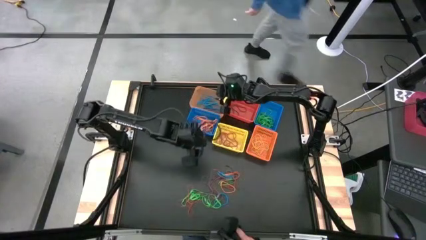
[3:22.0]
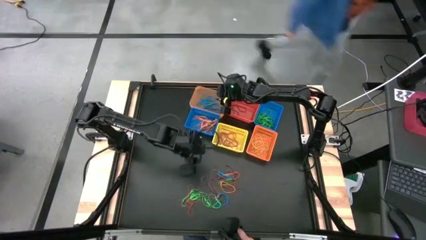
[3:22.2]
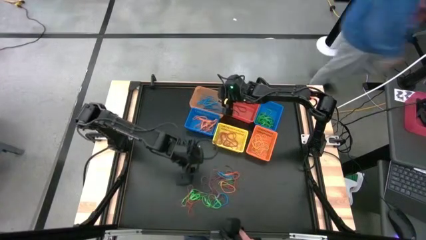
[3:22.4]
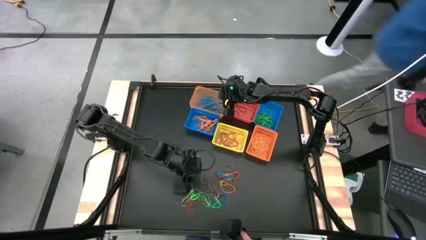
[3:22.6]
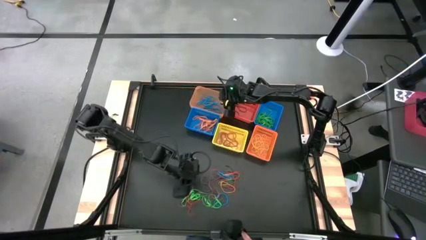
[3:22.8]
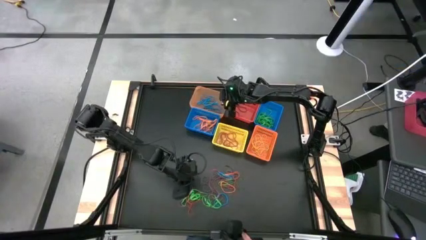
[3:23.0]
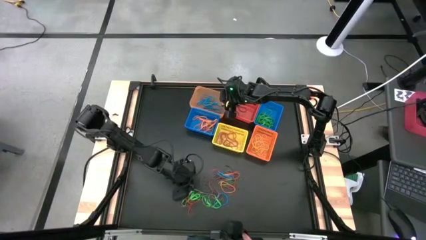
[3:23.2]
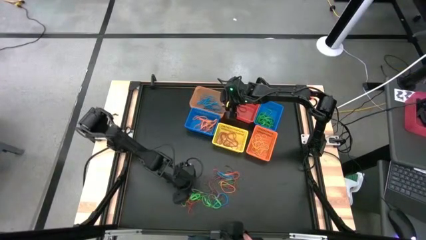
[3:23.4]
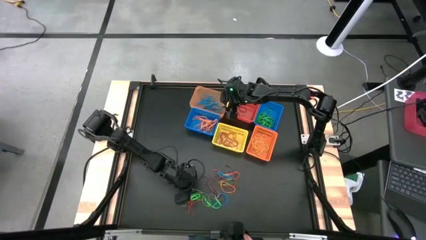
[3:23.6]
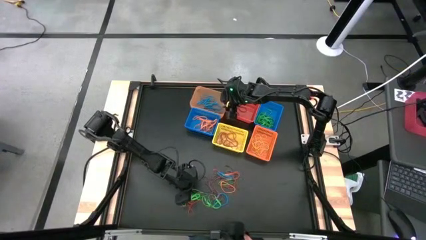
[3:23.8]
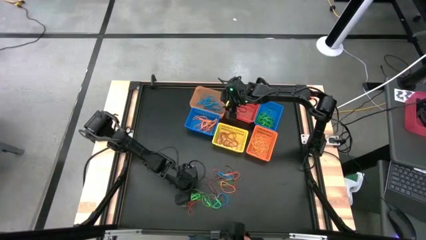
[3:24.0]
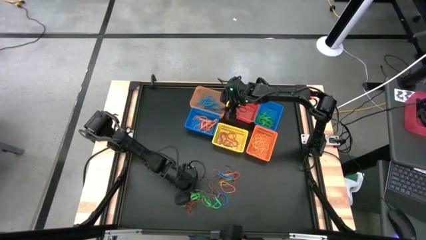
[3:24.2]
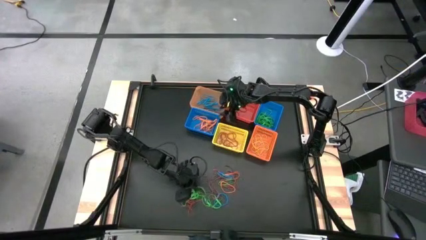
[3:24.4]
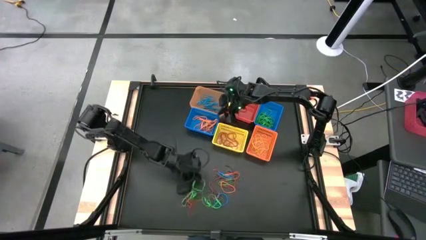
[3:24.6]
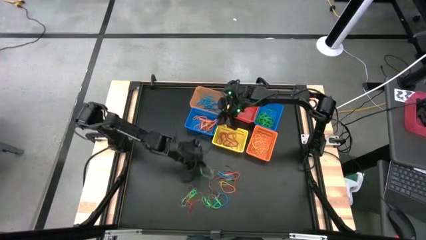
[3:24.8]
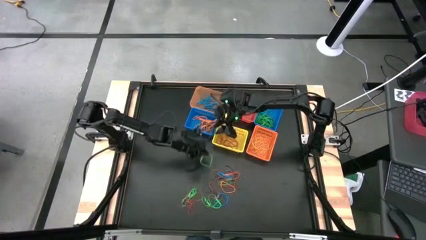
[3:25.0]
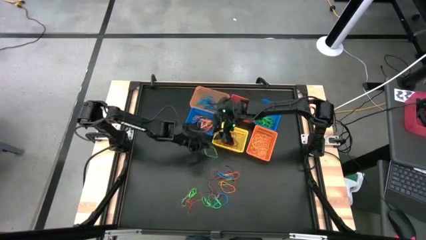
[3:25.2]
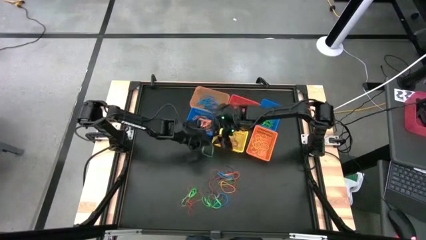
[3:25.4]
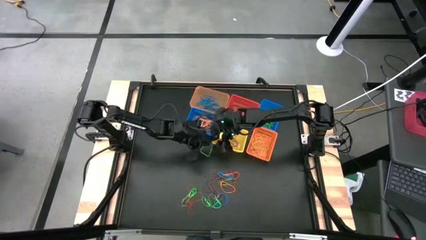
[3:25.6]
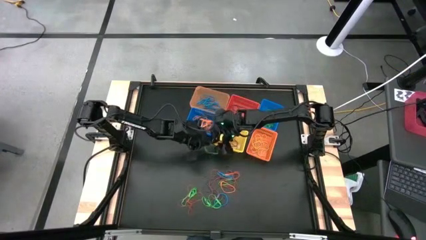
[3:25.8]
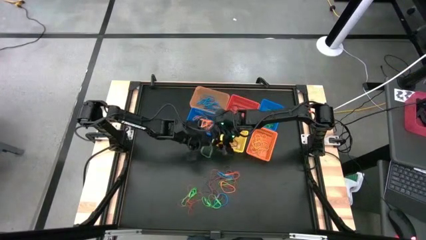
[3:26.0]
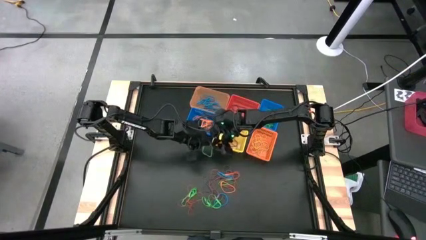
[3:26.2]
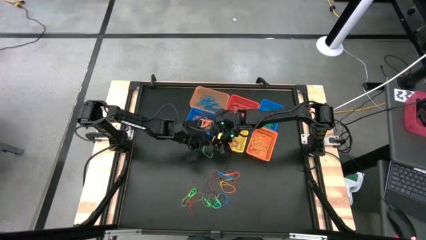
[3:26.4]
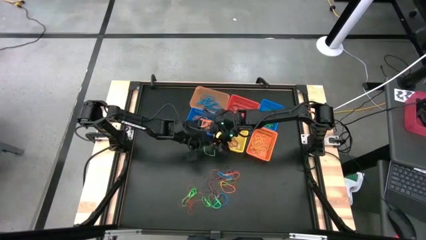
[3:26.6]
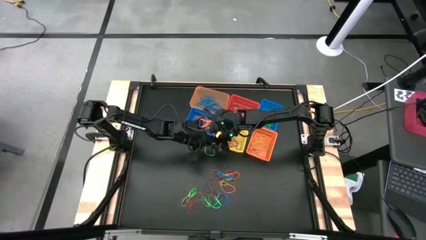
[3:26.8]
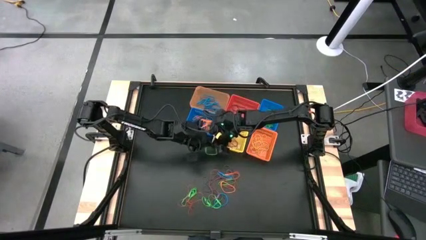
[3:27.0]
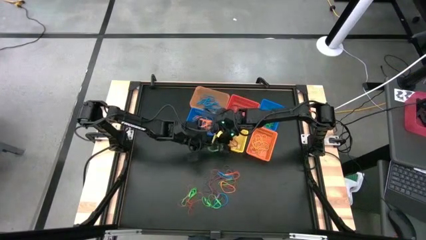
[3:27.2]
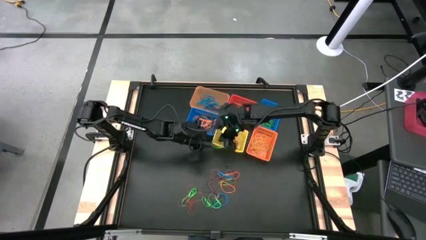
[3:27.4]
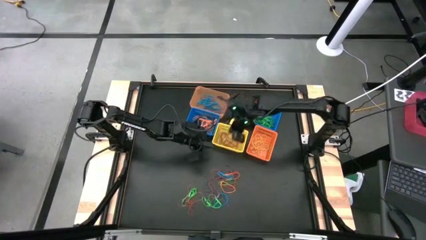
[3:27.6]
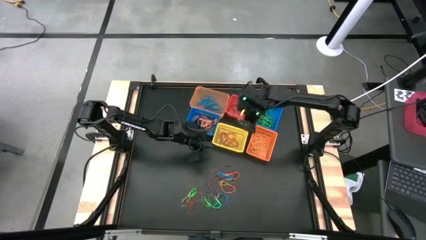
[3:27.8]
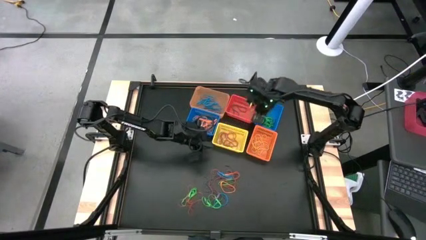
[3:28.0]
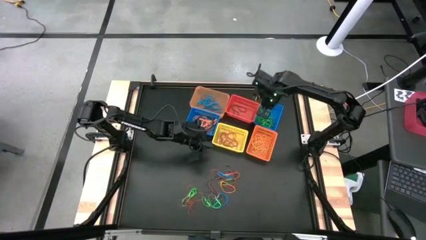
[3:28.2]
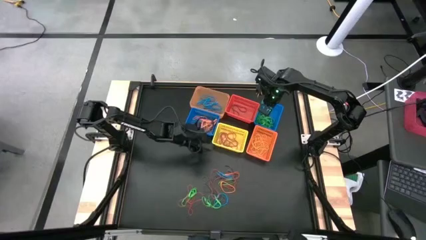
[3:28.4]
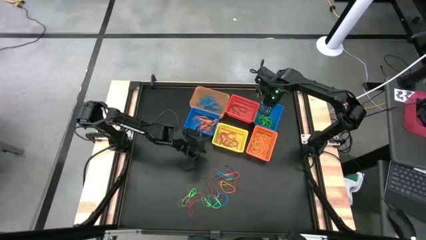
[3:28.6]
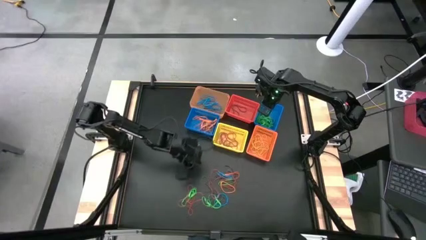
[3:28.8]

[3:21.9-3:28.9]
Task: Sort rubber bands into baskets
Put the green rubber band into the right blue basket

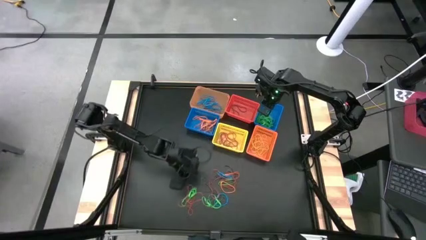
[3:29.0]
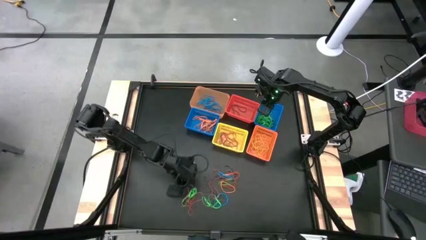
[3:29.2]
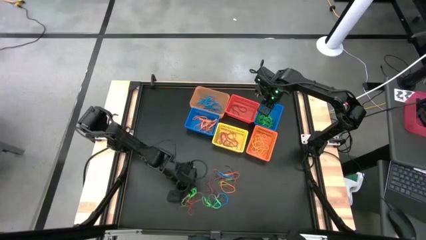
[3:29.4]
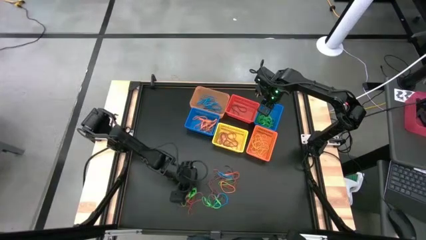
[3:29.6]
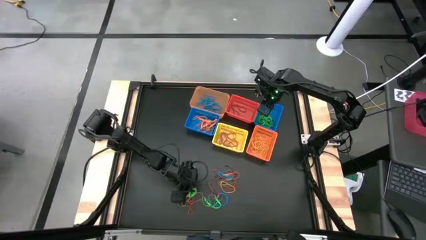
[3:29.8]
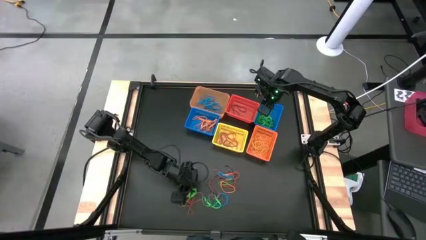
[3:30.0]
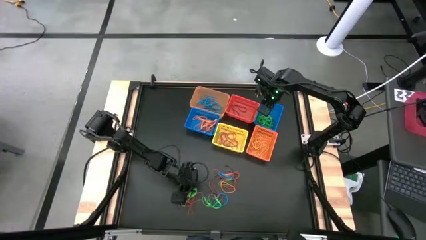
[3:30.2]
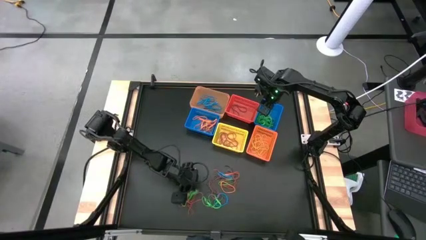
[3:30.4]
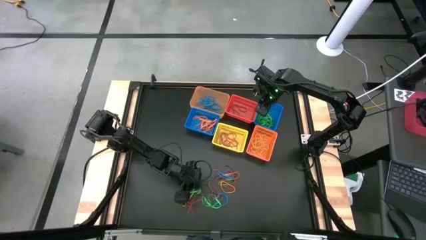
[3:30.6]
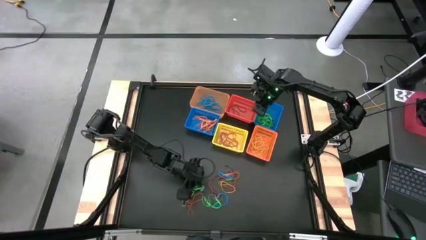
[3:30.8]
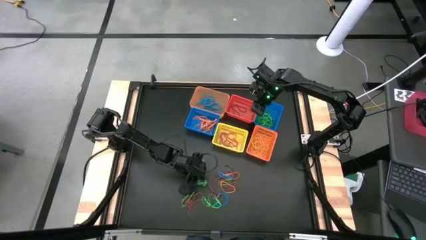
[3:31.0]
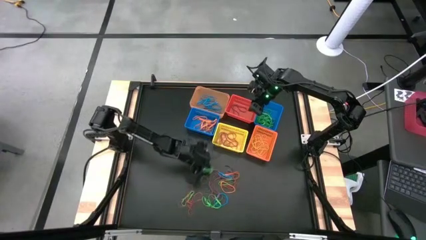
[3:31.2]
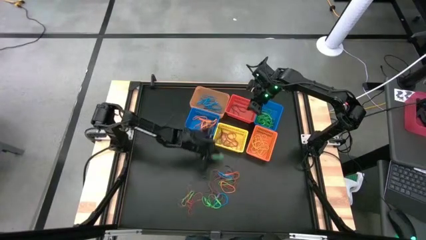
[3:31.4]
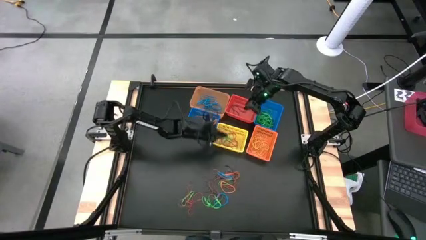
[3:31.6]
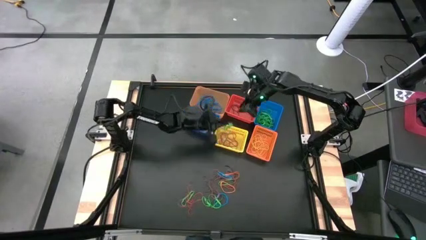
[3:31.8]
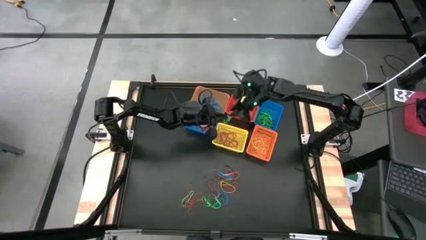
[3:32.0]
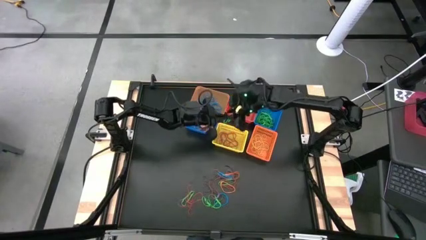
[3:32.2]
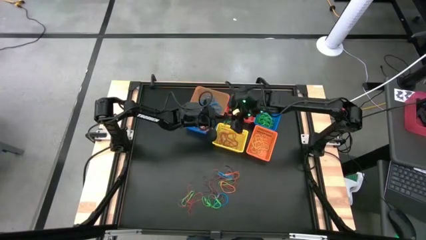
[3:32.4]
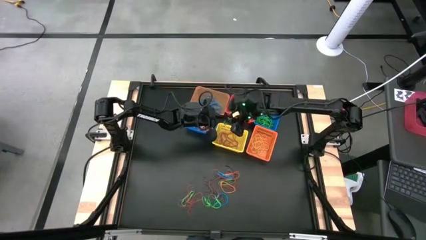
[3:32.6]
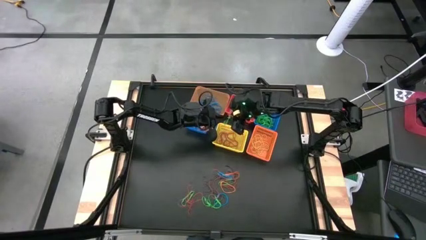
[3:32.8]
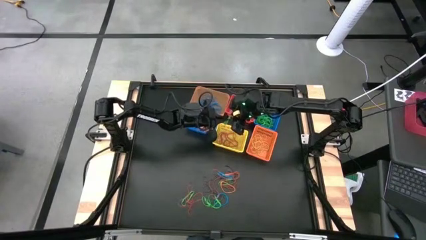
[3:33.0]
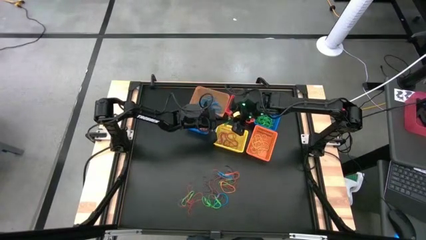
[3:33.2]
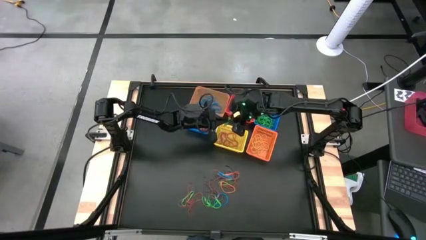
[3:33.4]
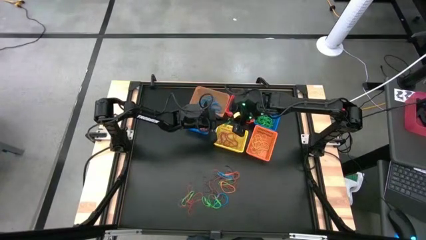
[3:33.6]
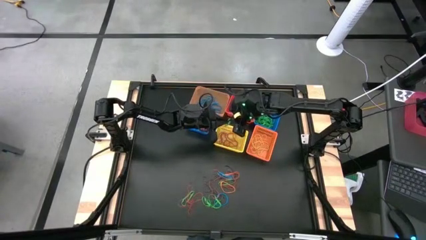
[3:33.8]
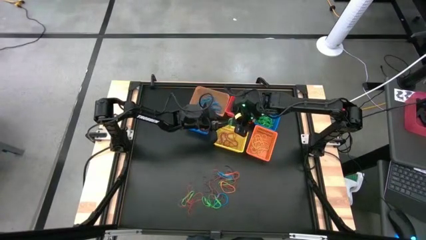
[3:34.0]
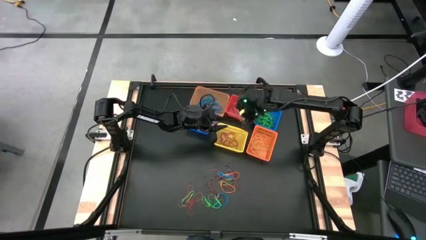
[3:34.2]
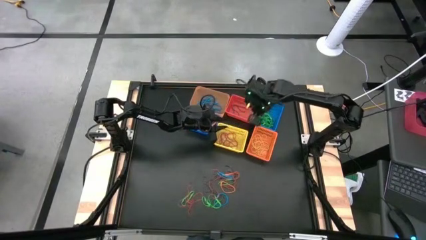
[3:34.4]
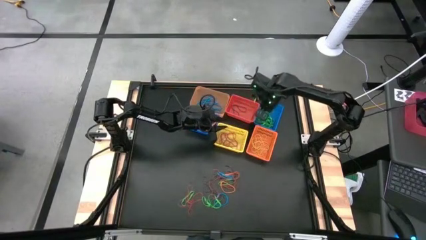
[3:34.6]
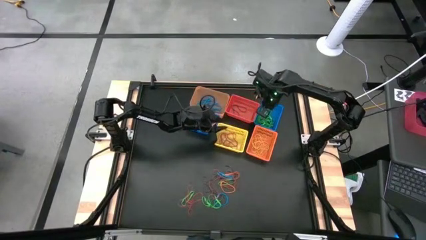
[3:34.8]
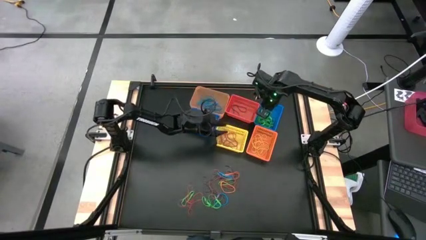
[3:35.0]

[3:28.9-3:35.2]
Put the green rubber band into the right blue basket

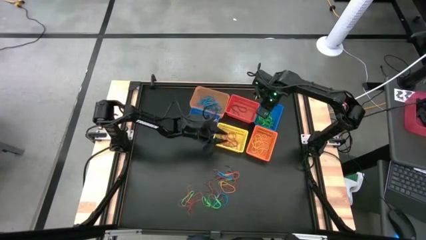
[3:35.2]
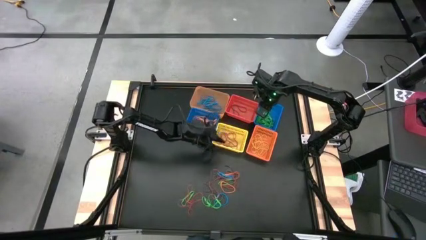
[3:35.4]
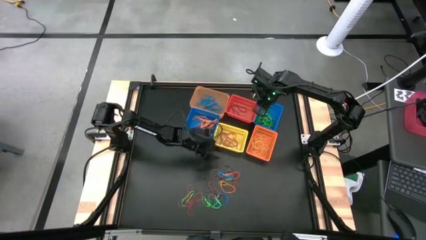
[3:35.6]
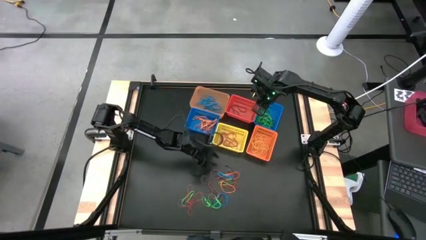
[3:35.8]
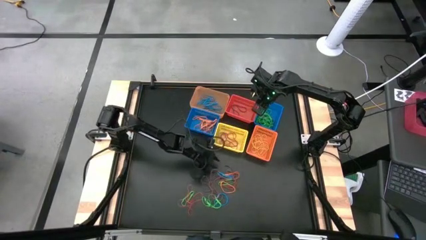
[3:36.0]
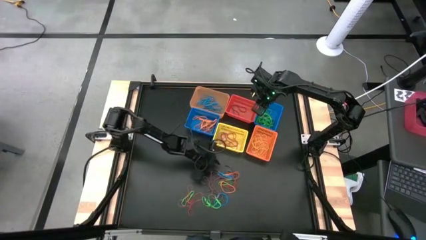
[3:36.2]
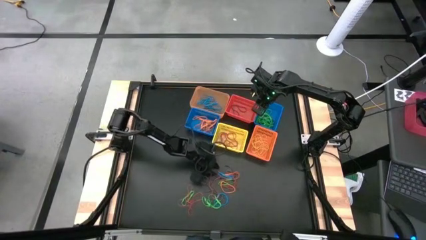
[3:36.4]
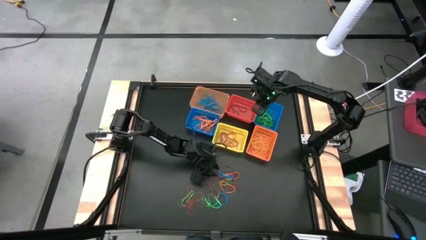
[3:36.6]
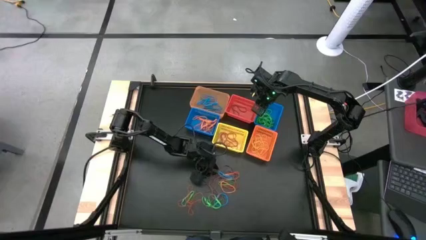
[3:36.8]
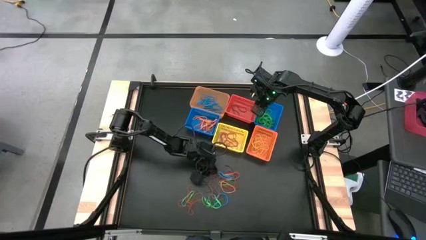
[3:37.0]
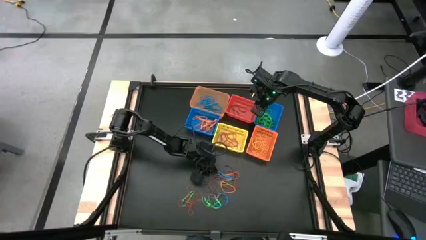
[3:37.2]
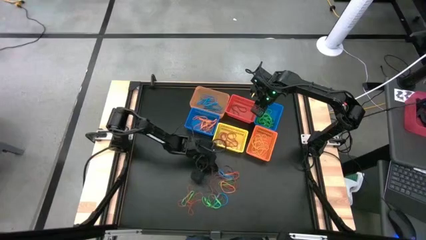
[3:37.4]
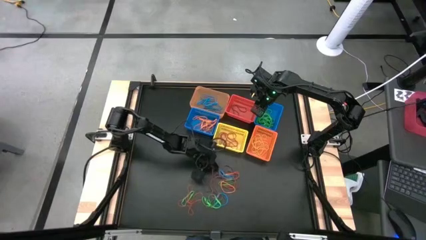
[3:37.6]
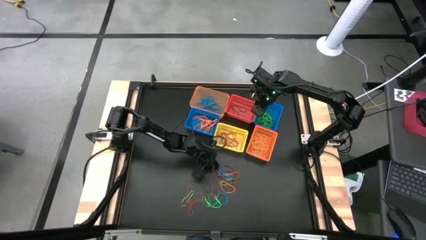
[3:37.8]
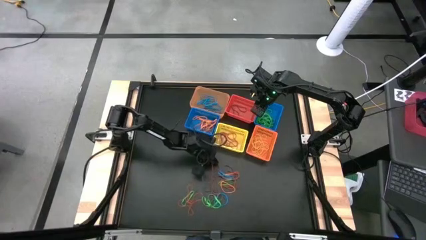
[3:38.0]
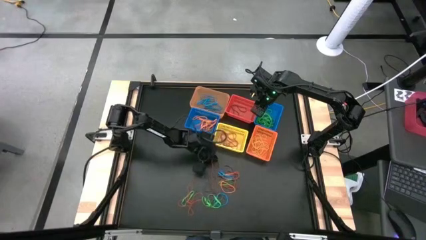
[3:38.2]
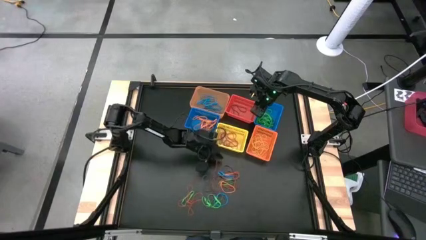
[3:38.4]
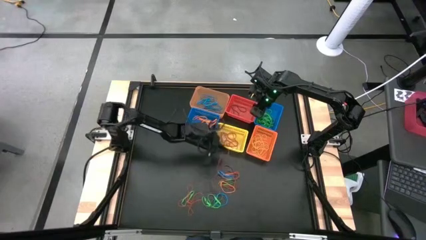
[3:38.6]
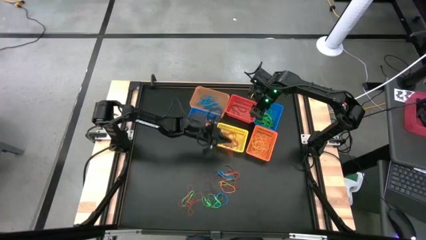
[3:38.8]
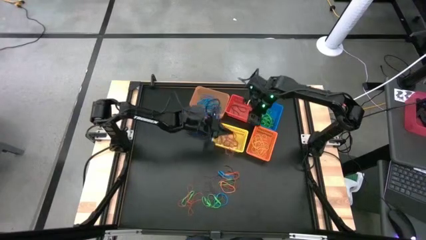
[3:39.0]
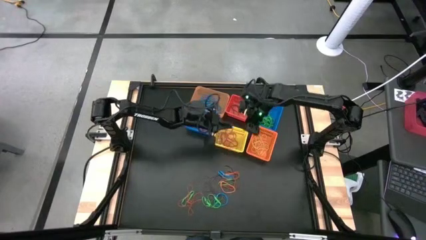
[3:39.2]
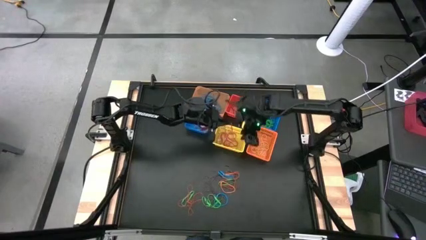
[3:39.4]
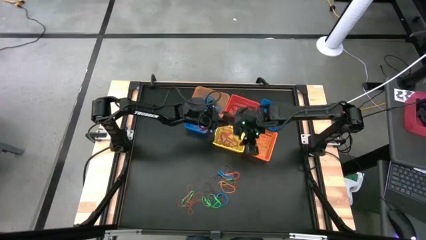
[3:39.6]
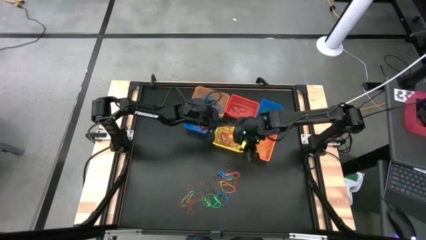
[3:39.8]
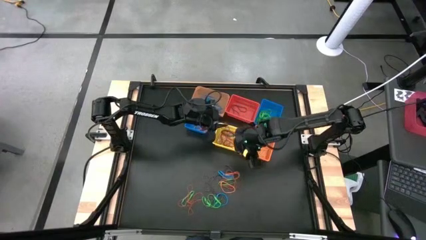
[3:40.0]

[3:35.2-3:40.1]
Put the red rubber band into the yellow basket
